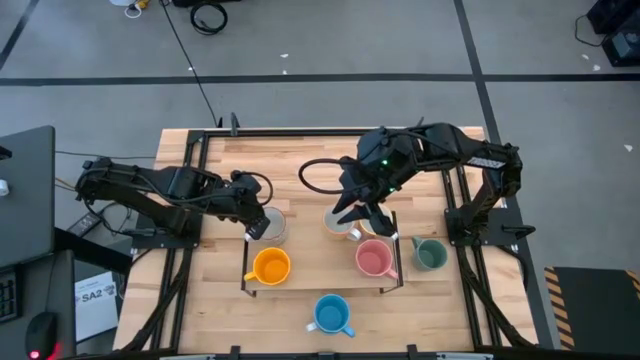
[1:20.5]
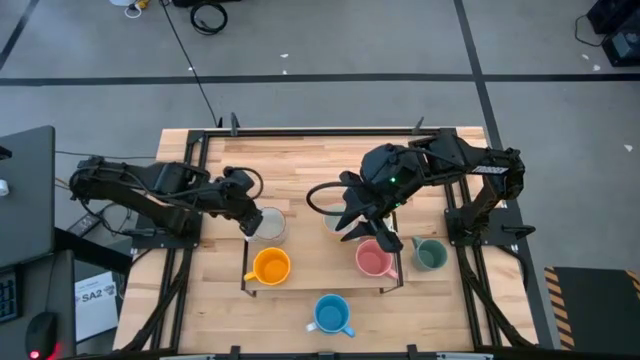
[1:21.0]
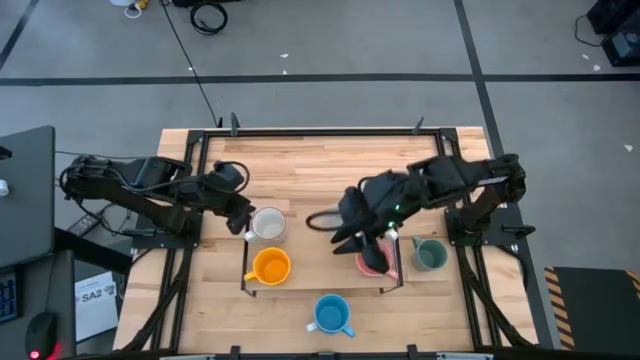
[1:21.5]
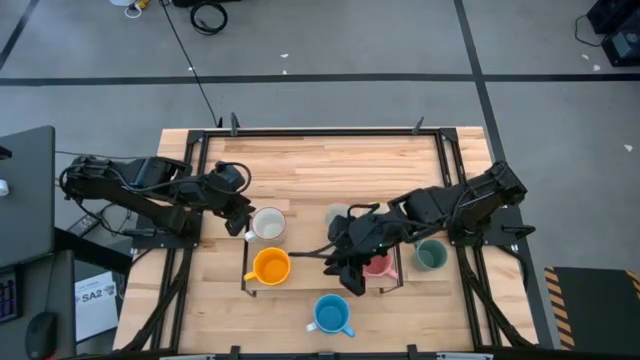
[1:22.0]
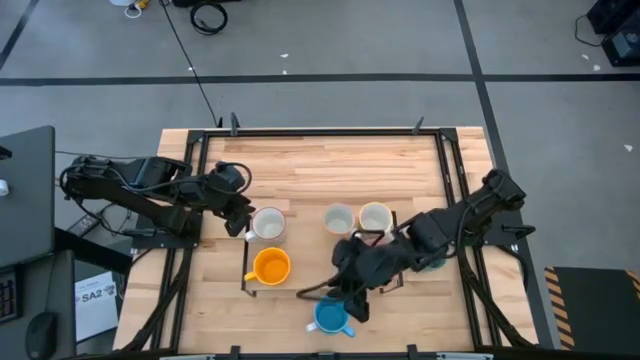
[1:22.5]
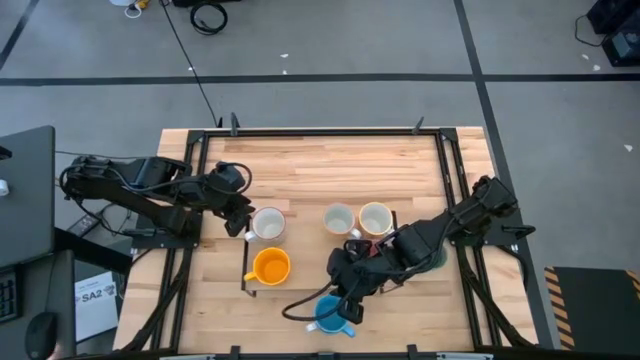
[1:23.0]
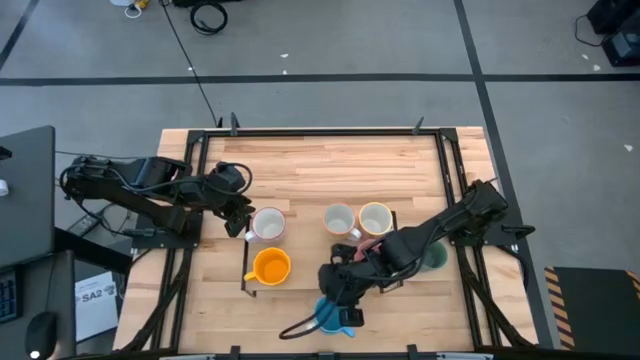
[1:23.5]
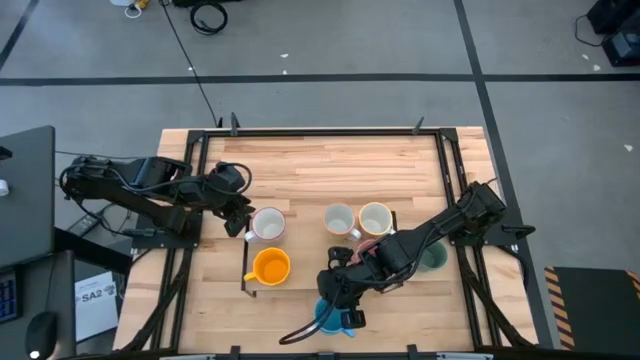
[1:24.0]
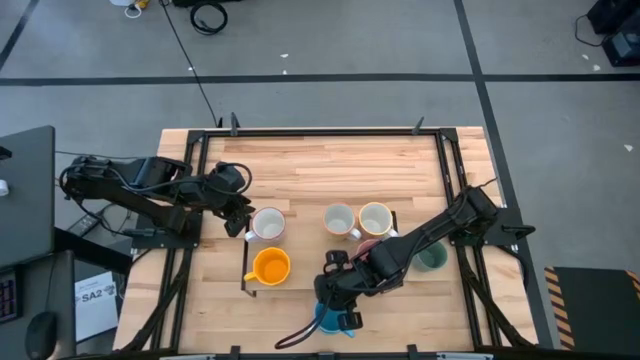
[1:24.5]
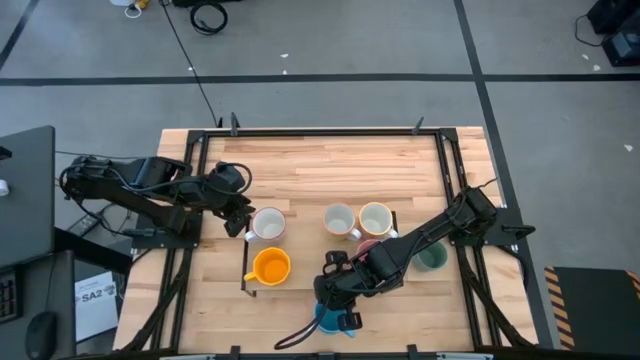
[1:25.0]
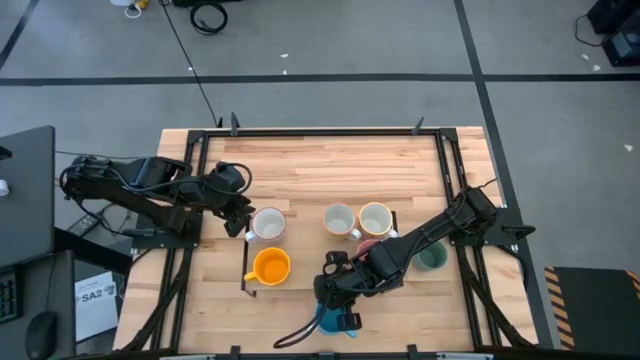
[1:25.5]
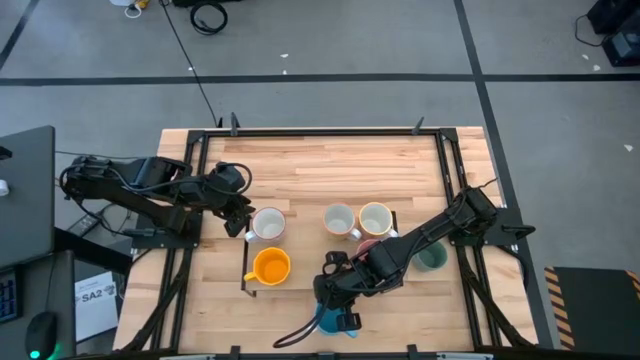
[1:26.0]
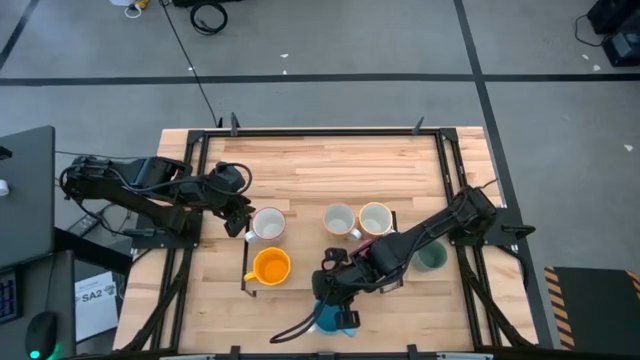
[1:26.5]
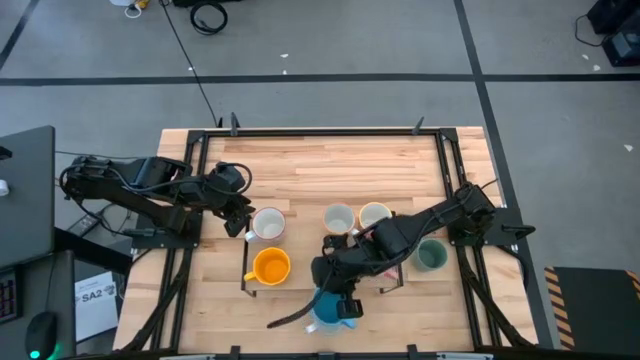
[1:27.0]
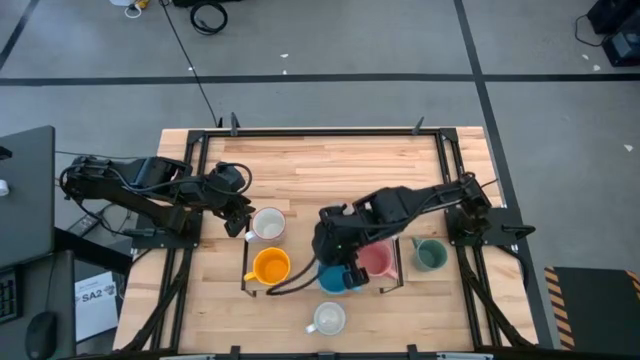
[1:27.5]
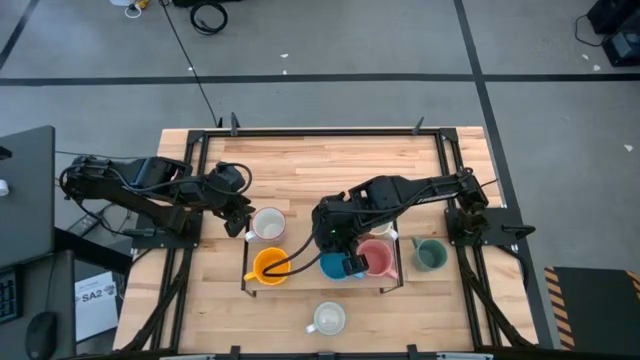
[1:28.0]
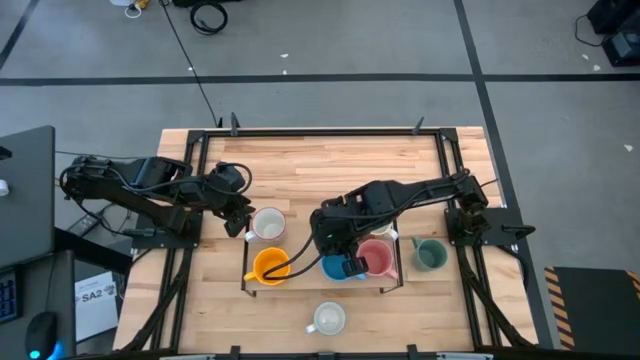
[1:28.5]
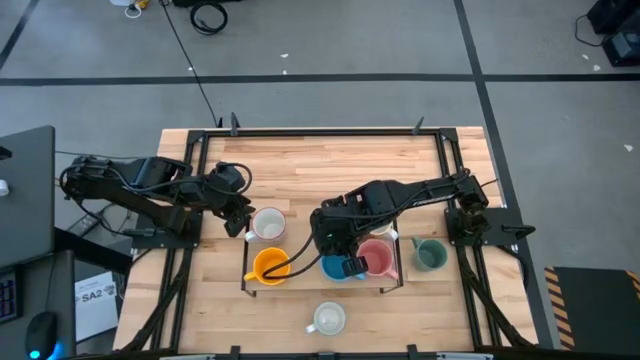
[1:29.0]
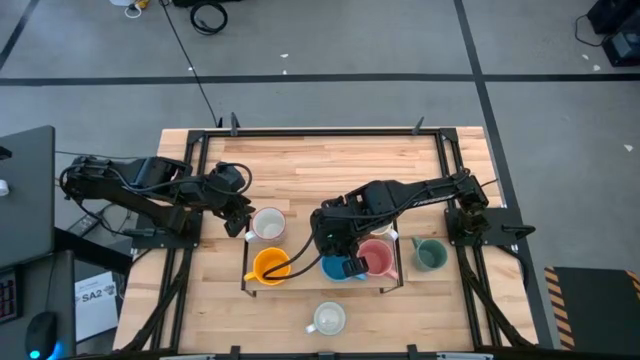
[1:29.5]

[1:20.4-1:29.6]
Task: Place coffee mugs
Put the blue mug on the shelf

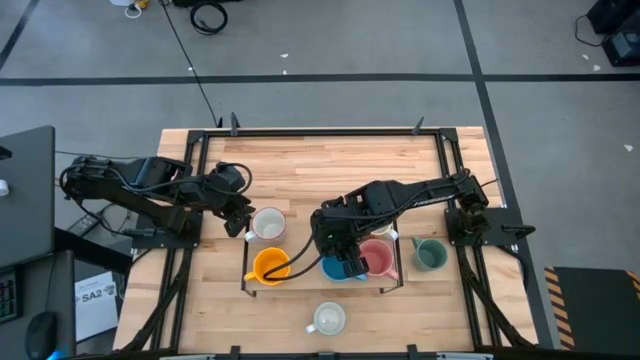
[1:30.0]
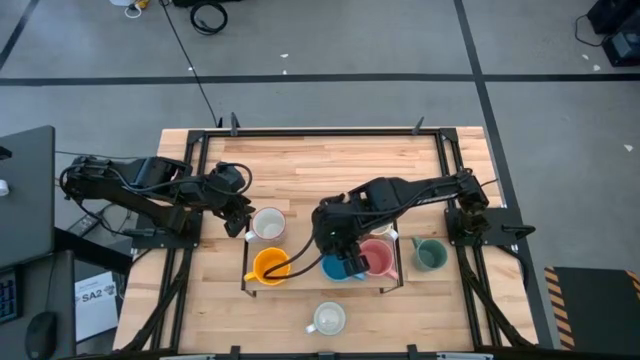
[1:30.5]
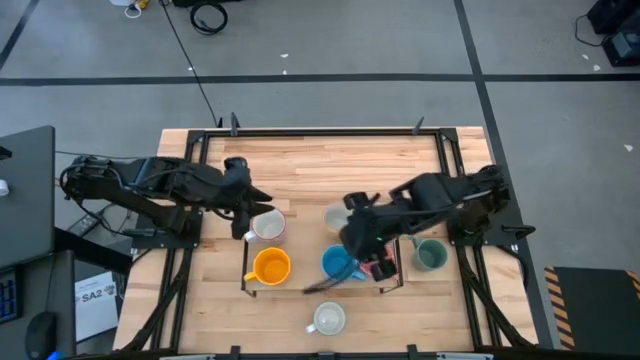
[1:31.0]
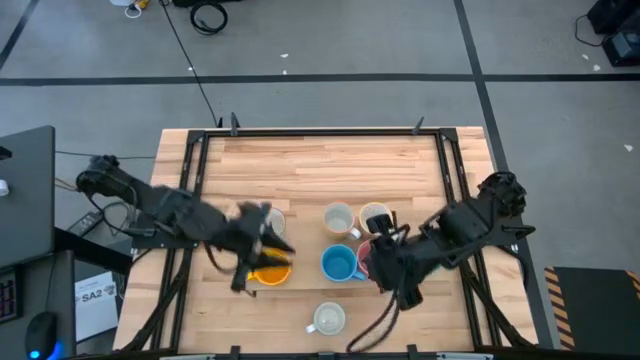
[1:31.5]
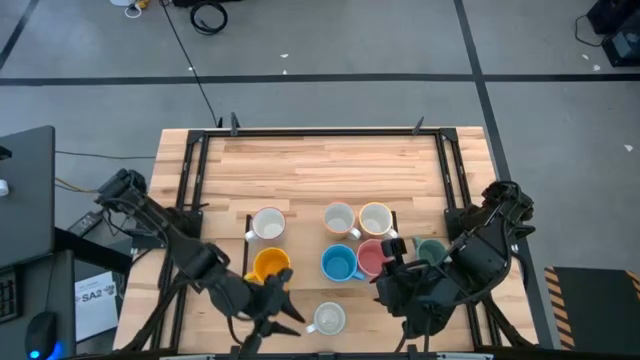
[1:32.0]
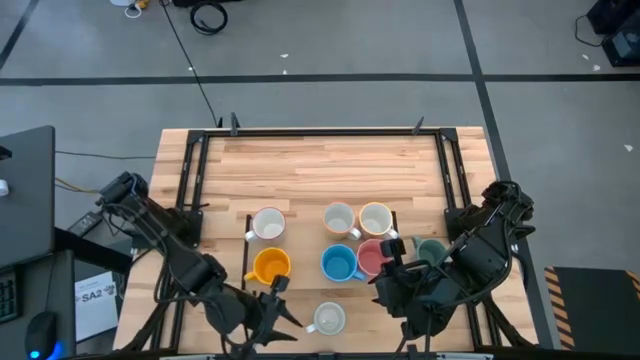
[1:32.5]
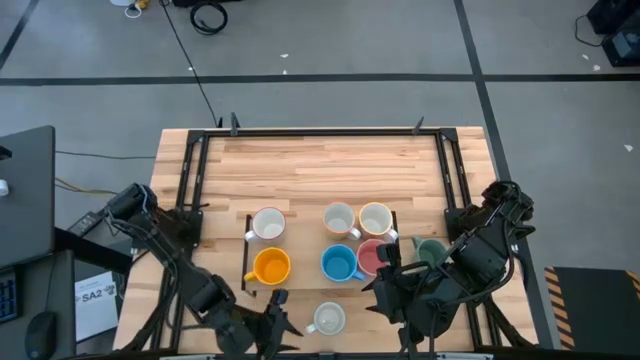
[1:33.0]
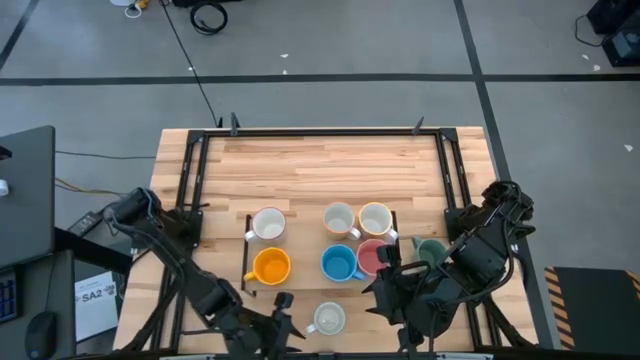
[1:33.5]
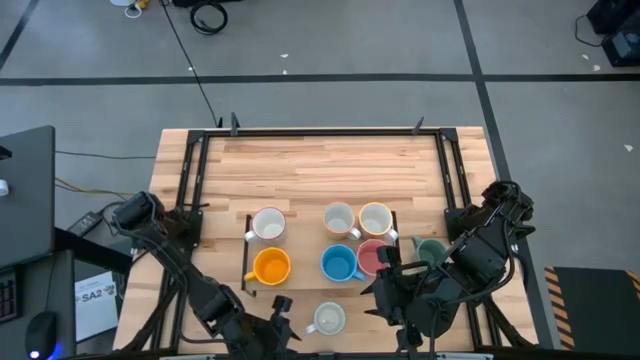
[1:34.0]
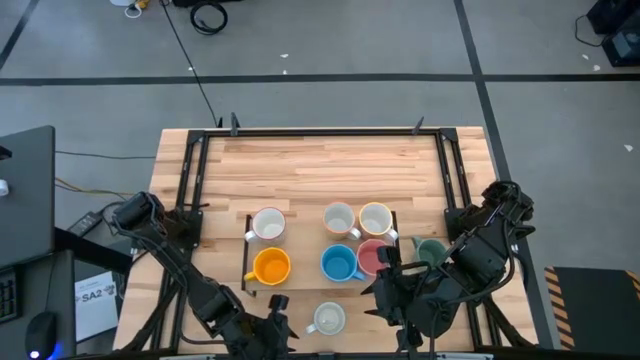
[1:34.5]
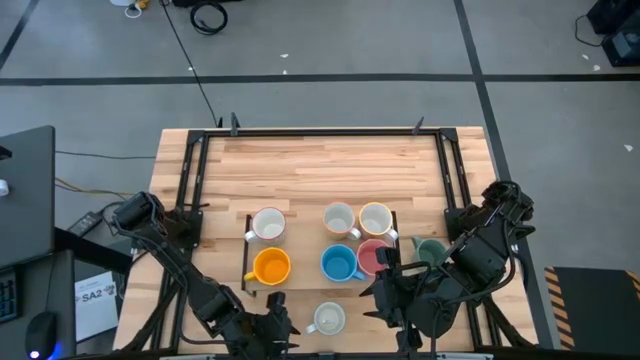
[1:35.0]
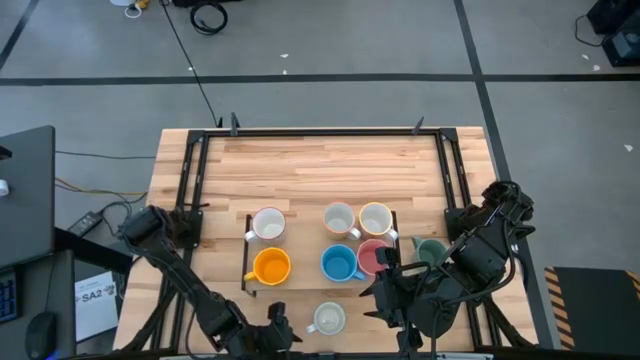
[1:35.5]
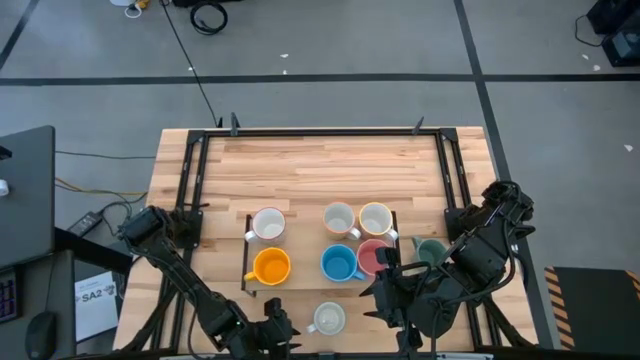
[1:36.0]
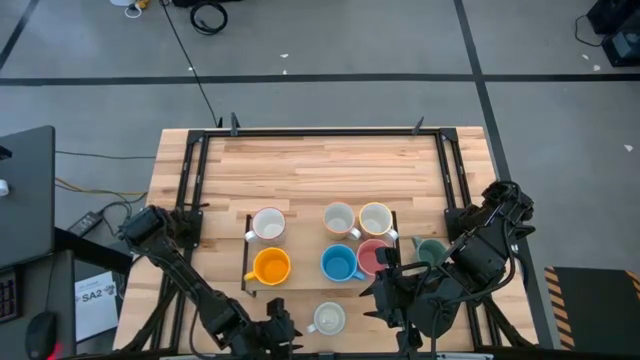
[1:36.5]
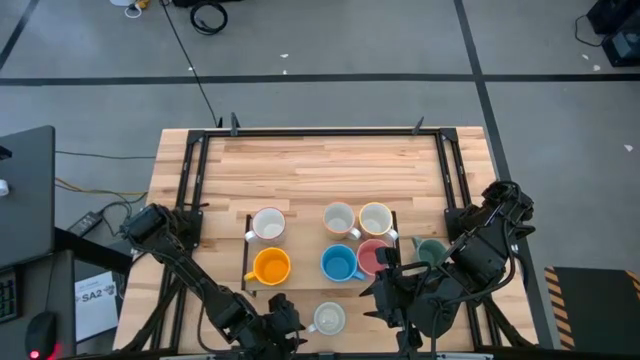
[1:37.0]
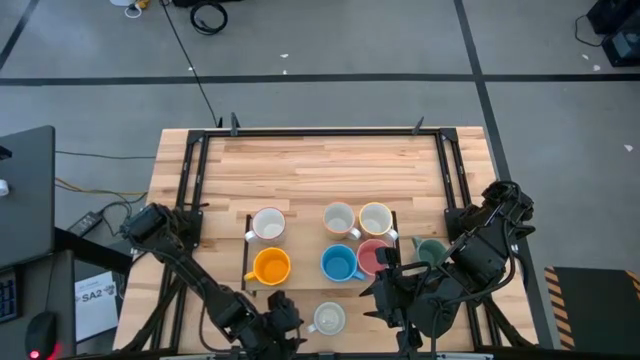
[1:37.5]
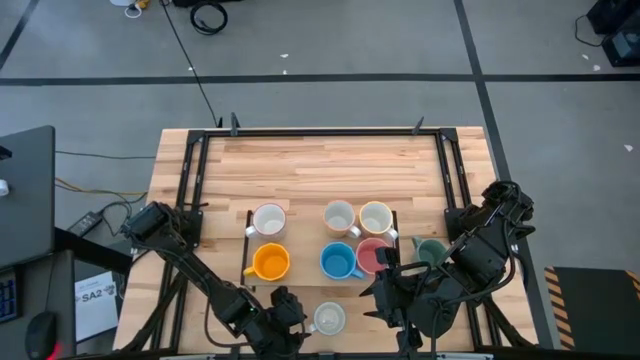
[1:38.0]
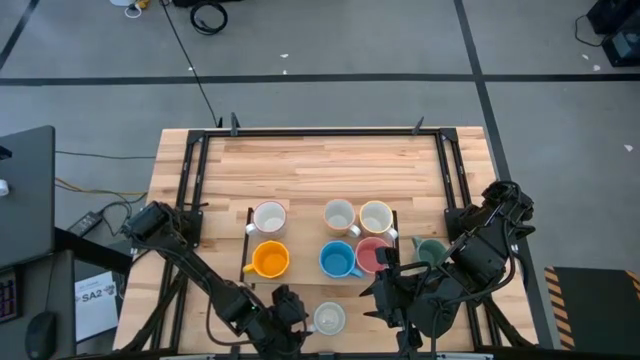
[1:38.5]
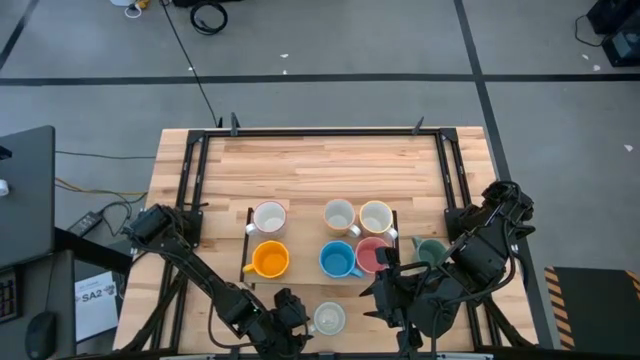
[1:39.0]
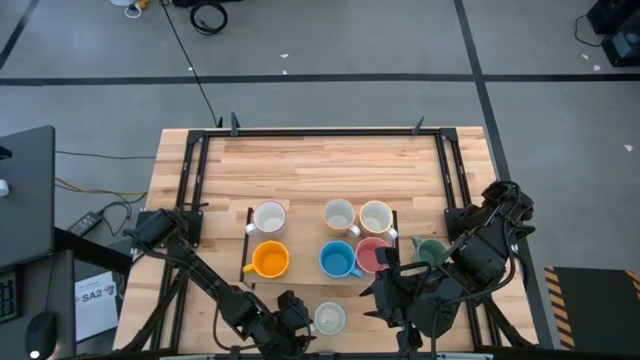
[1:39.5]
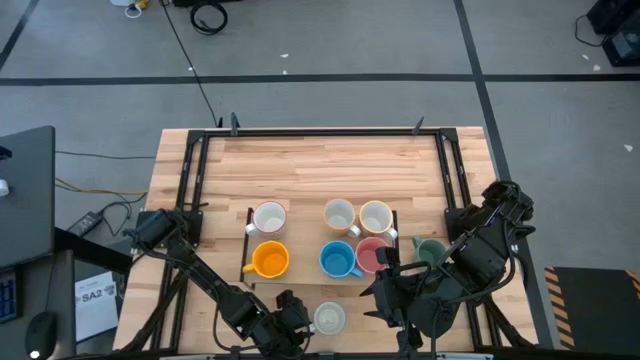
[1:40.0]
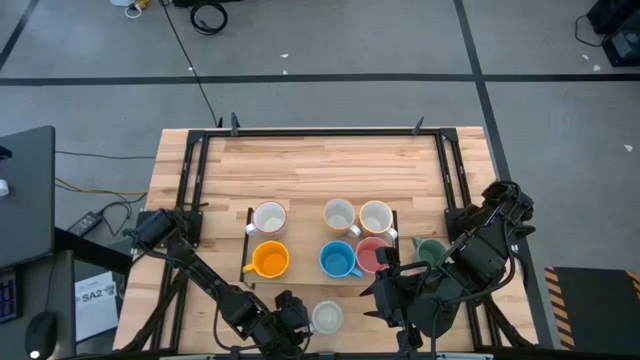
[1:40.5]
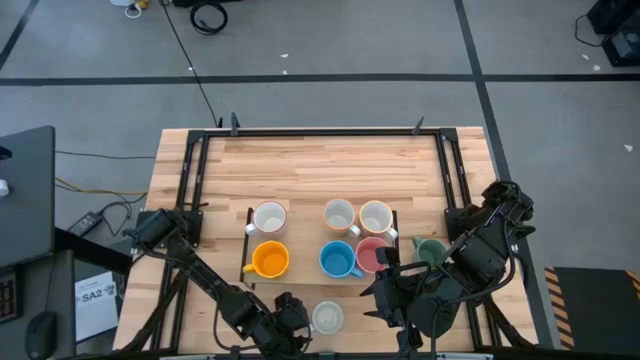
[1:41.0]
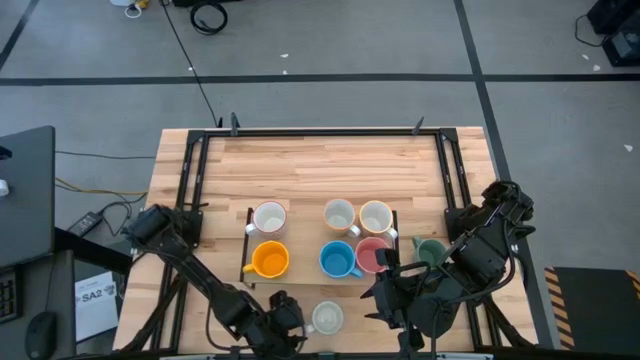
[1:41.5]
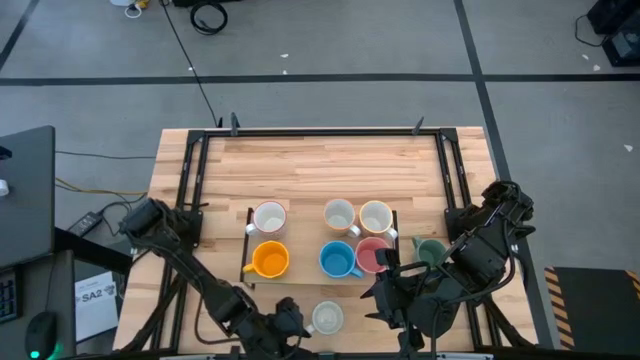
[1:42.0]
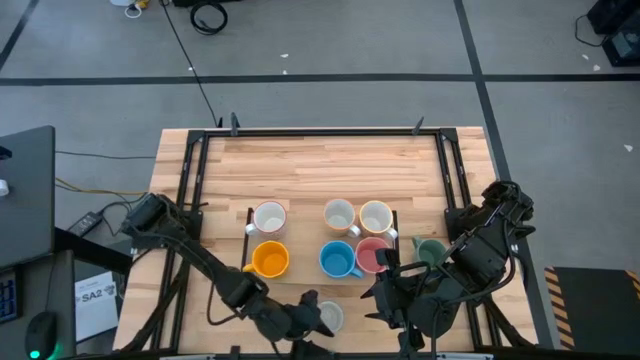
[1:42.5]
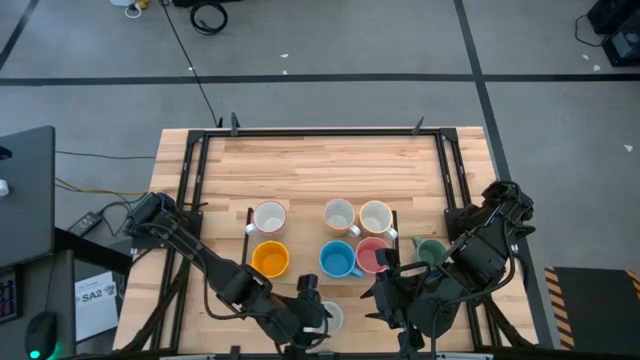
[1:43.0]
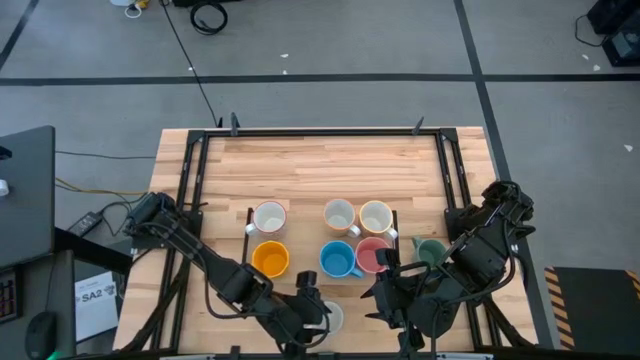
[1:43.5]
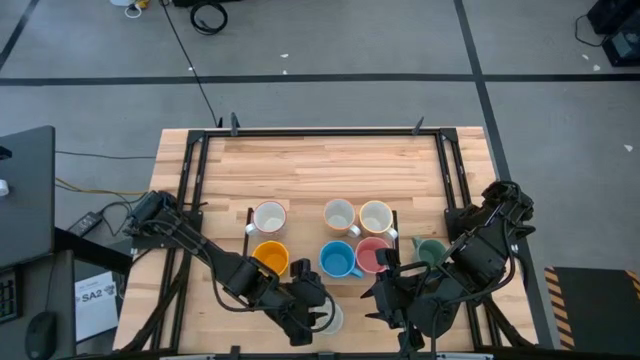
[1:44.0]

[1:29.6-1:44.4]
Put the blue patterned mug on the shelf
